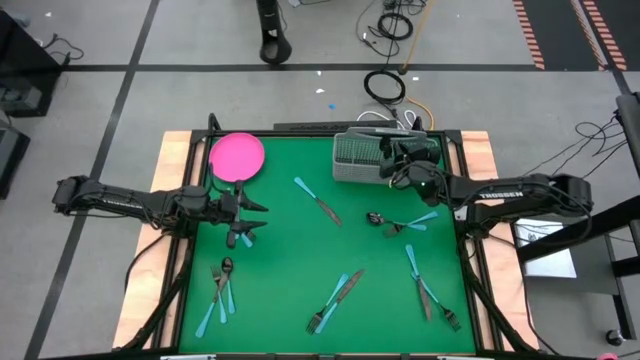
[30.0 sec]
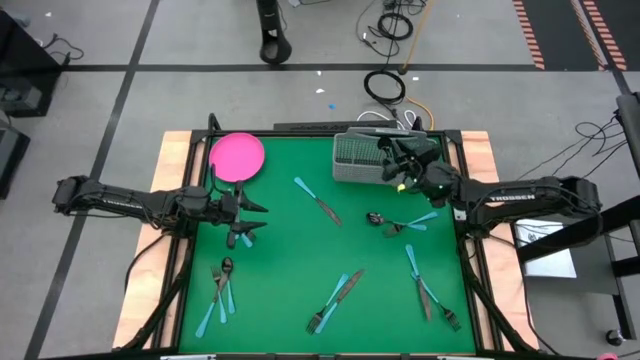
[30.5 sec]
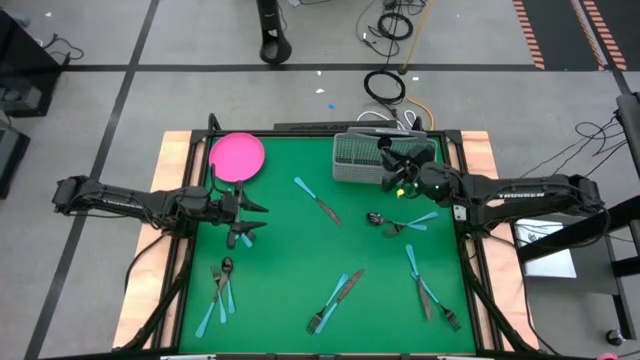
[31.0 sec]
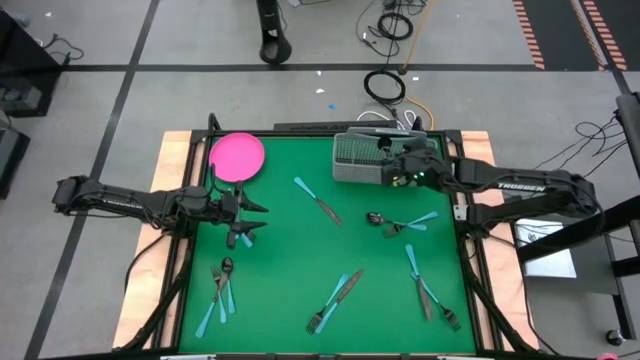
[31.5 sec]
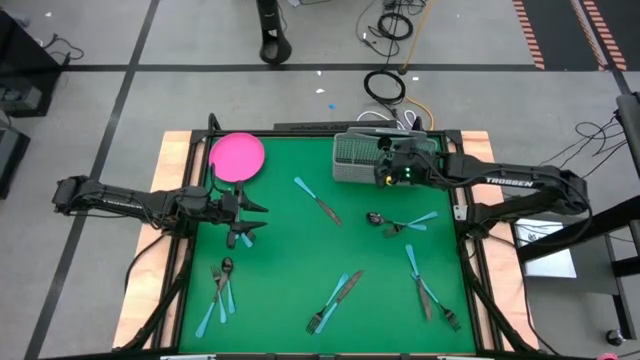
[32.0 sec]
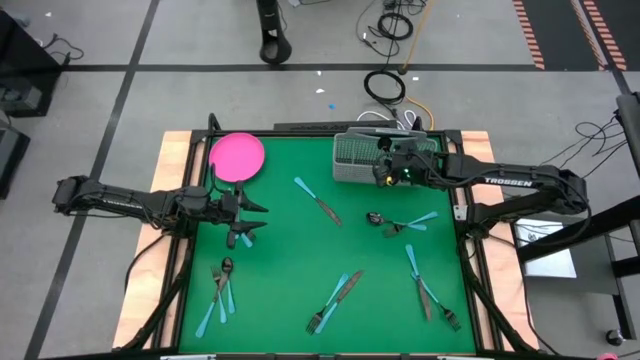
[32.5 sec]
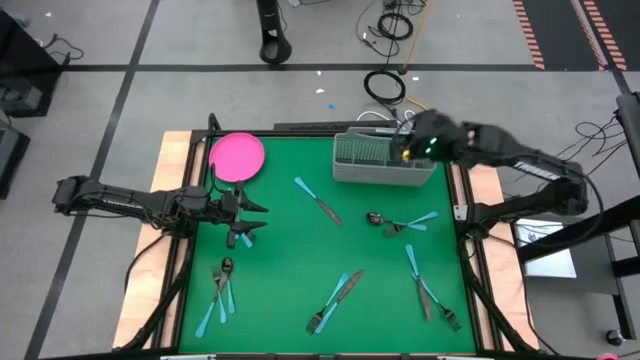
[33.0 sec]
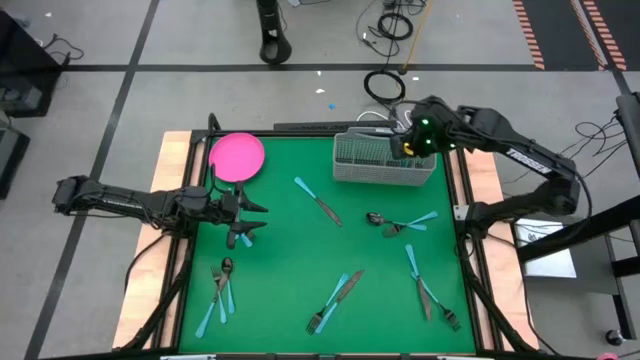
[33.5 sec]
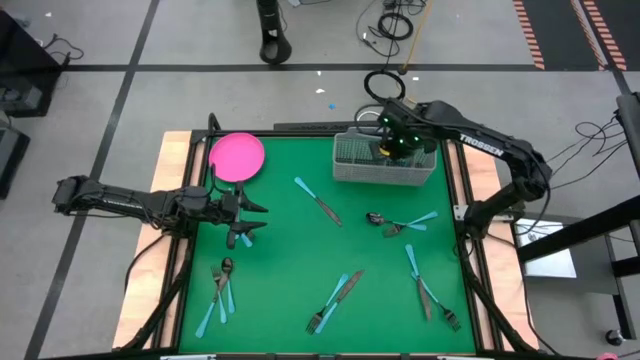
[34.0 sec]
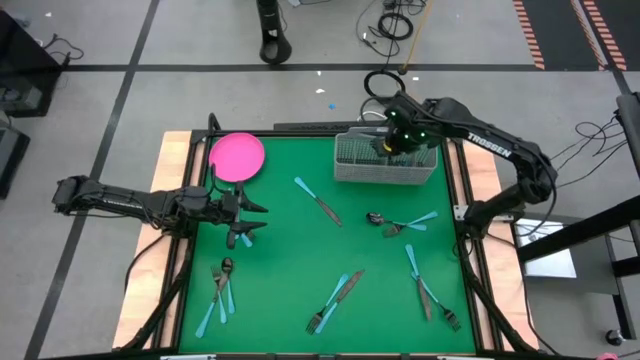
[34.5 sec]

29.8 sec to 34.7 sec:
Task: Sort silverware
Adjust the black spoons

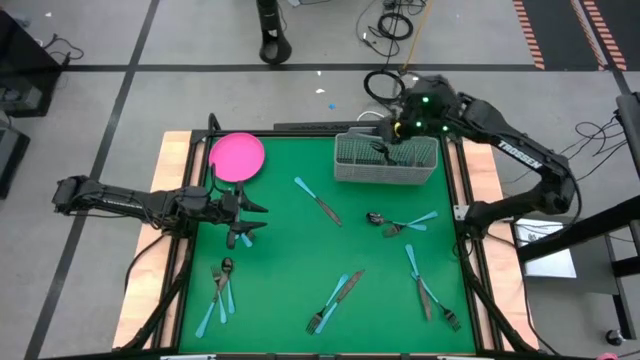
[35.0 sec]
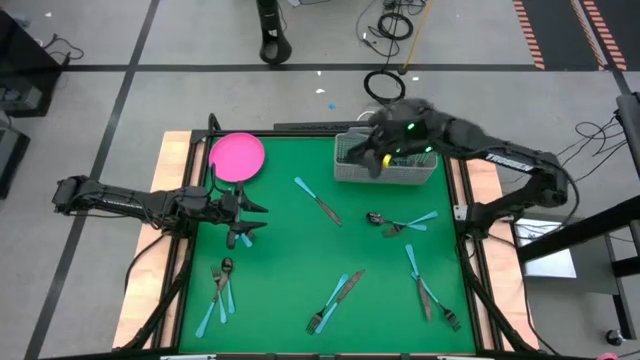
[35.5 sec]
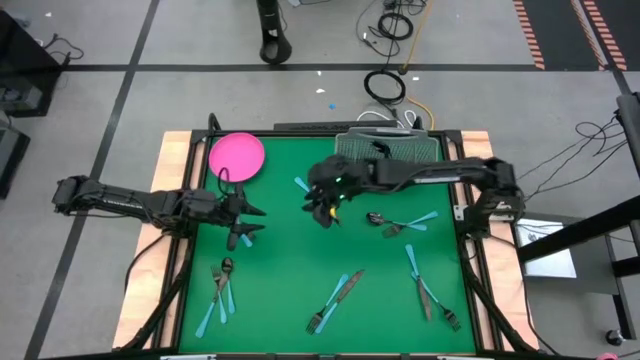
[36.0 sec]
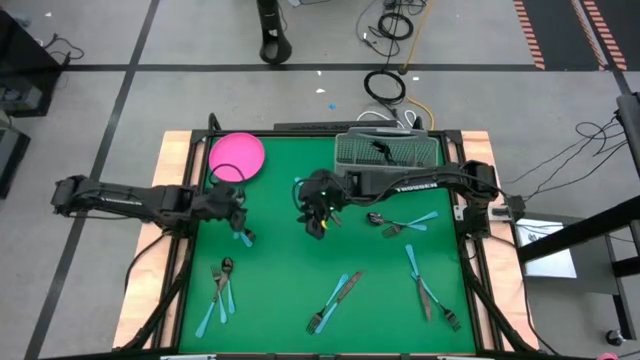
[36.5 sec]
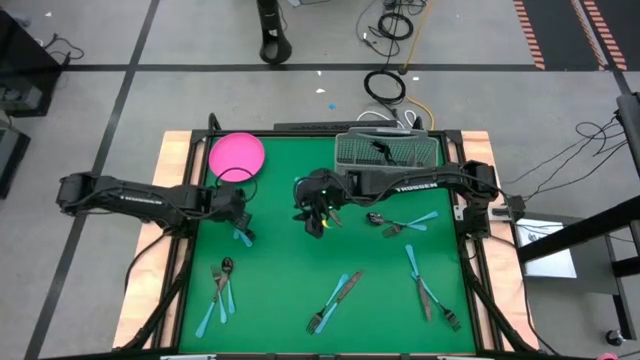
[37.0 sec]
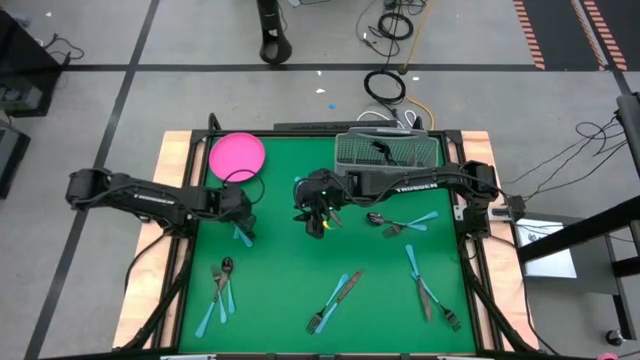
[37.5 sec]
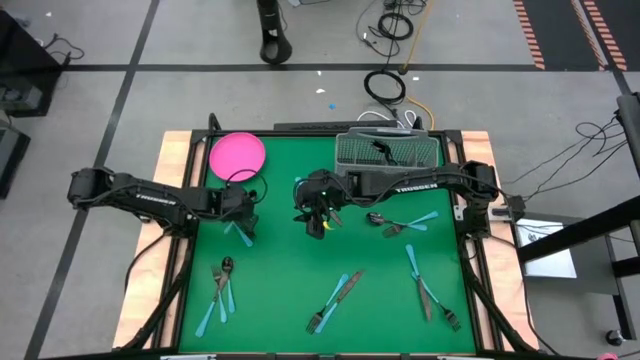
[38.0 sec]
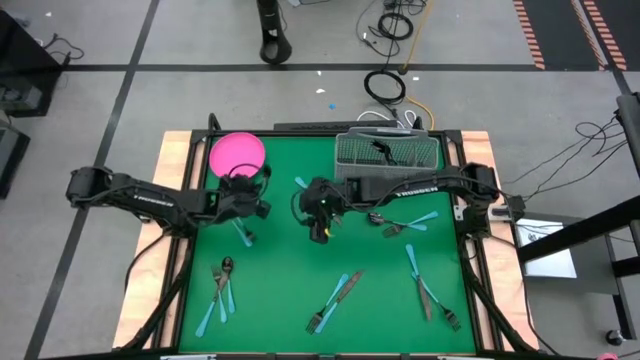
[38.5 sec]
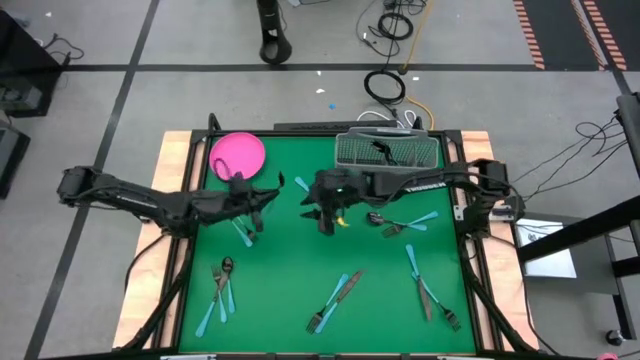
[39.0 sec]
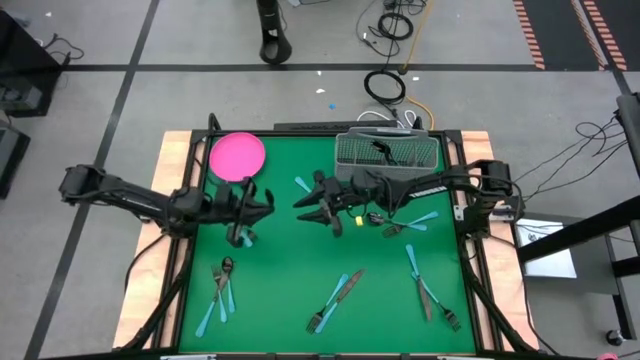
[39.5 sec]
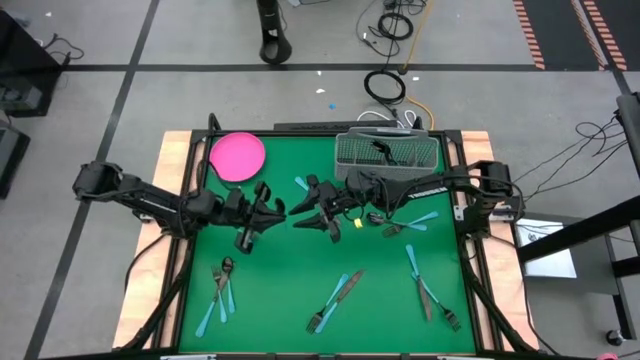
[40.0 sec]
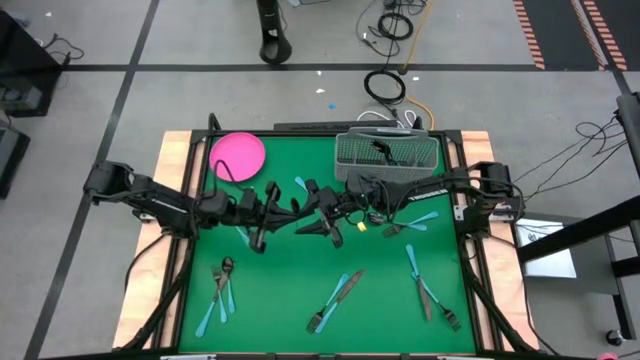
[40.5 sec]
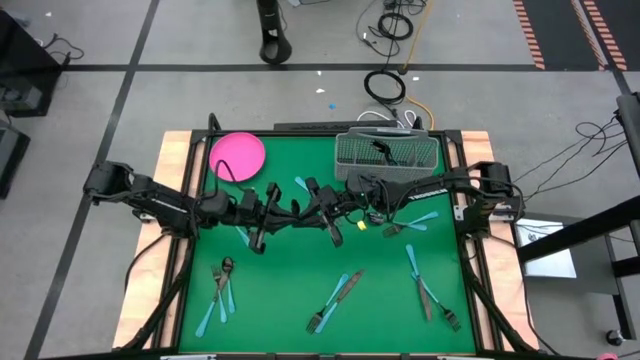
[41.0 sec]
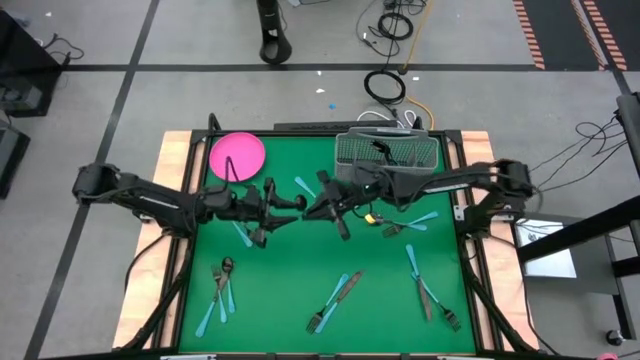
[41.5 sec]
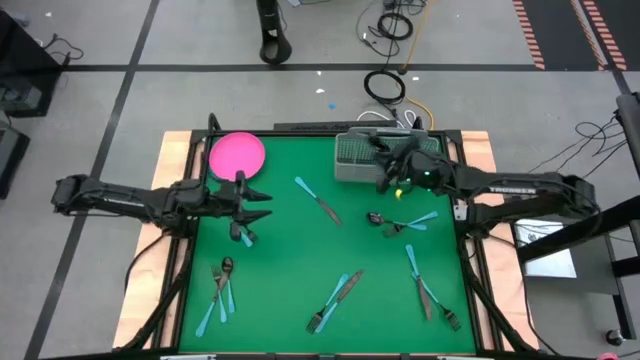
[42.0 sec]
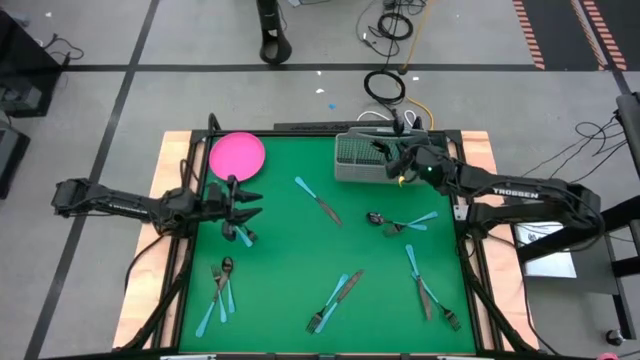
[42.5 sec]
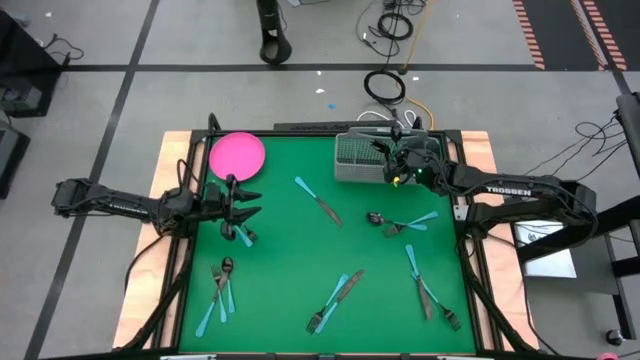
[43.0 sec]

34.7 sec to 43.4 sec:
Put the top left black spoon into the cutlery rack with the other black spoons

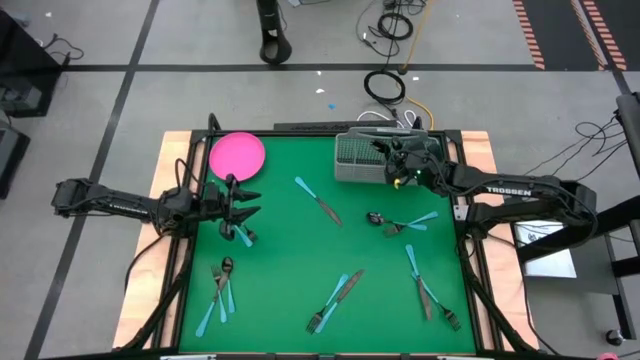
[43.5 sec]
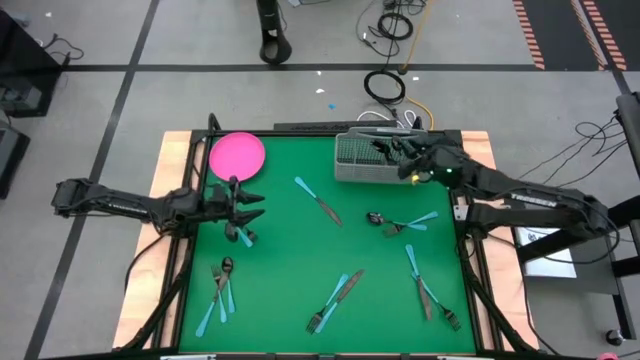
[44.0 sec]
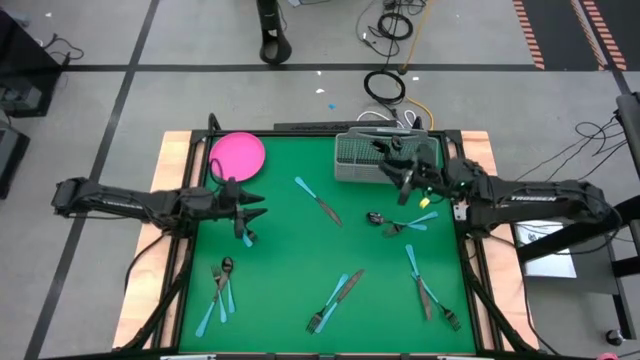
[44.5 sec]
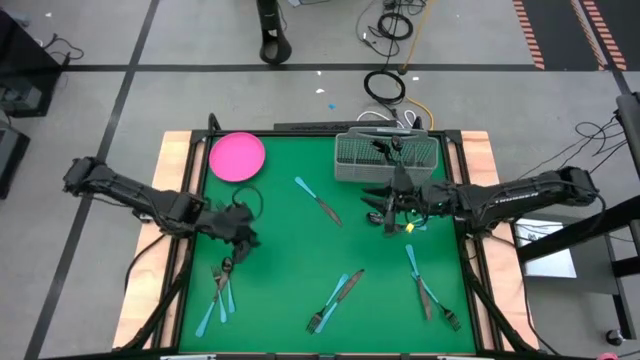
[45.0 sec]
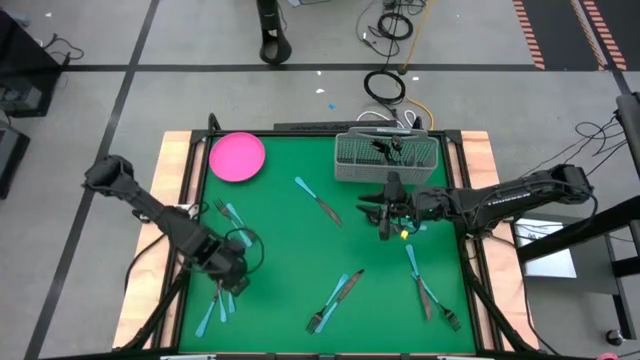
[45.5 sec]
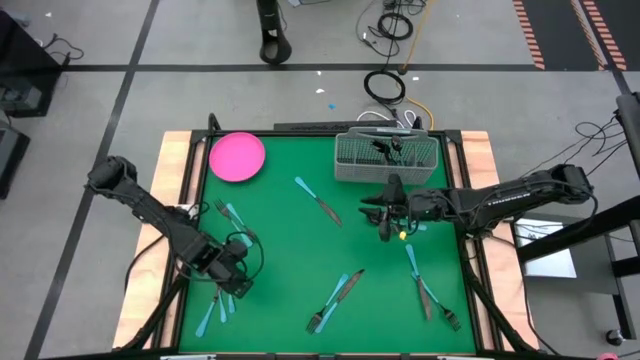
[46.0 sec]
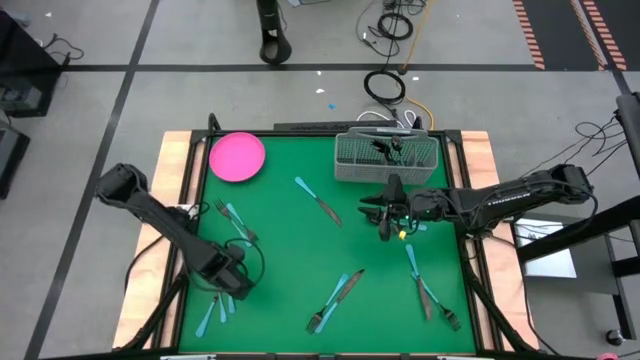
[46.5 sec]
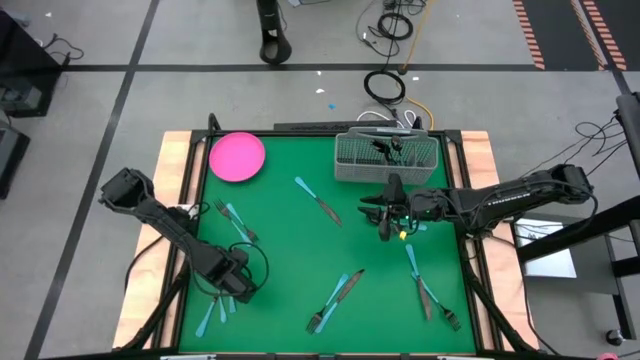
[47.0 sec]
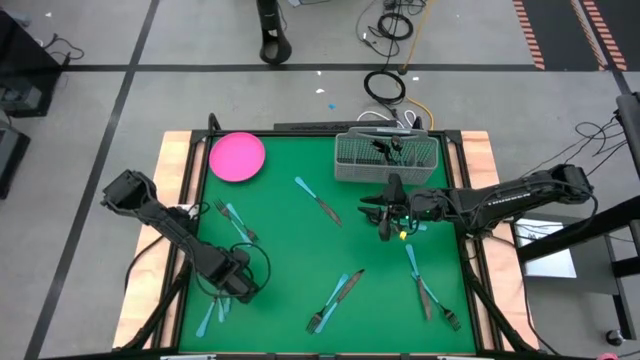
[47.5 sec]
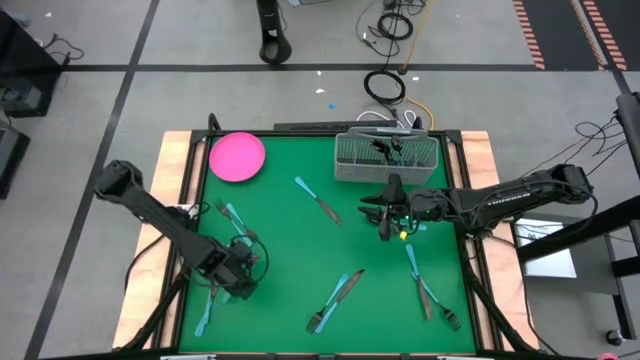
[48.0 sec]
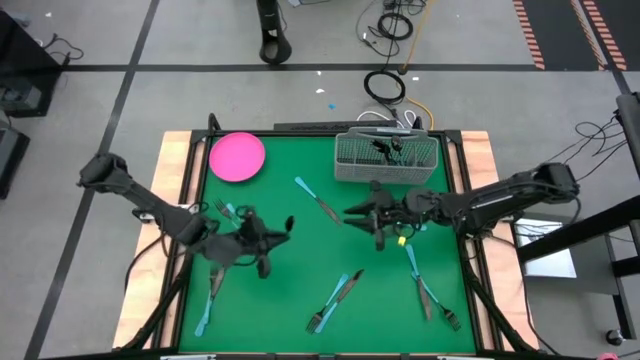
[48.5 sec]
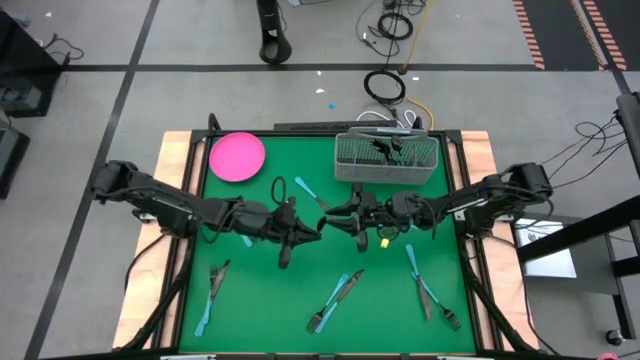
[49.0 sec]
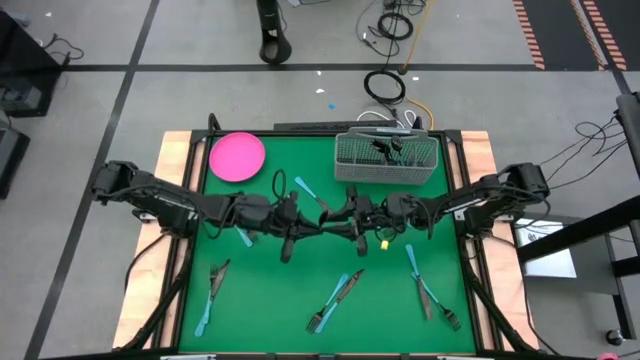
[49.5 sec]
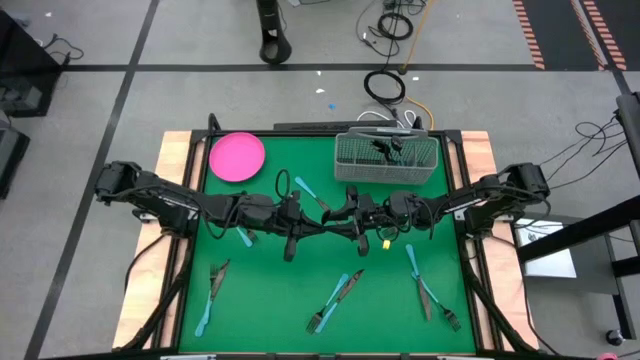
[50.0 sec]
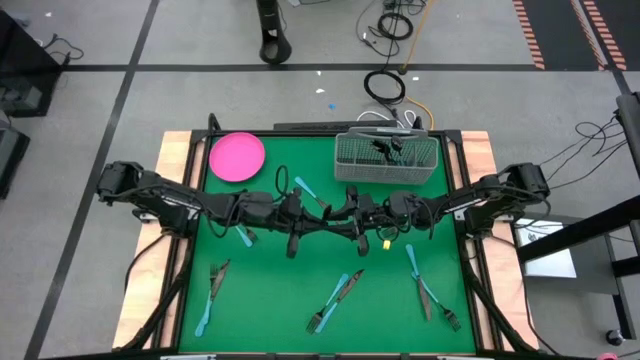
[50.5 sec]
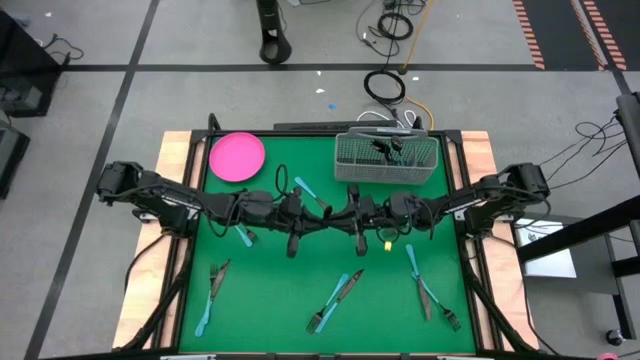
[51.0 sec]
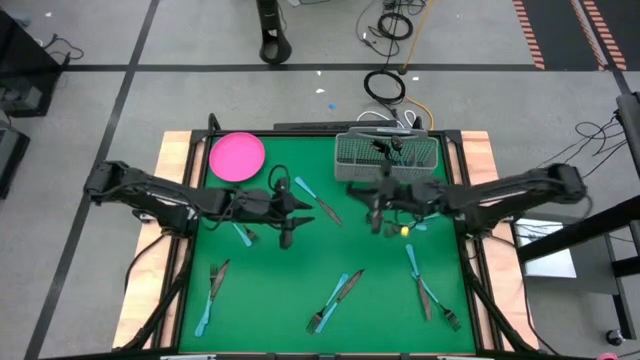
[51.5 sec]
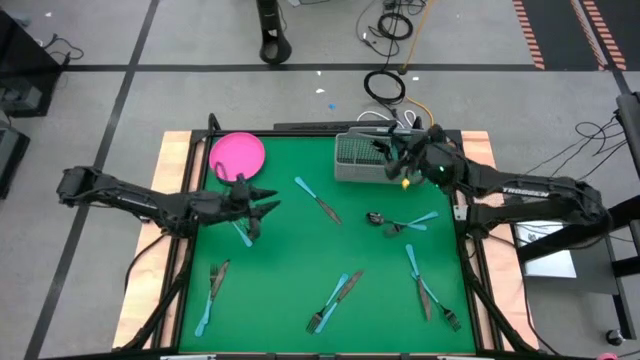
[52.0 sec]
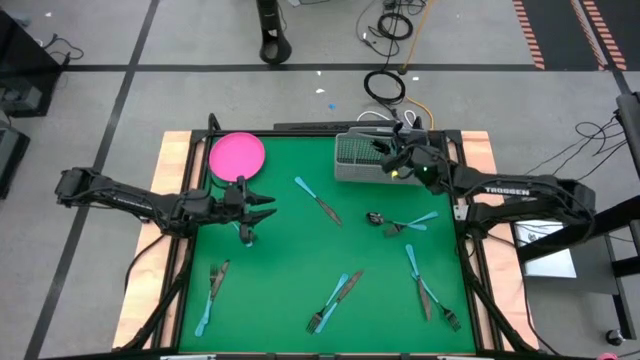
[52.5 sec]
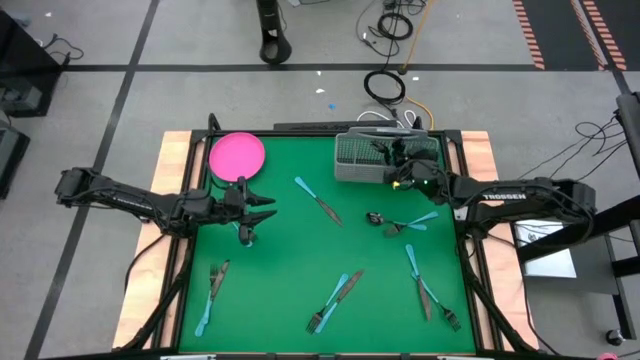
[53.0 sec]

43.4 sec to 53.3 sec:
Put the bottom black spoon into the cutlery rack with the other black spoons
